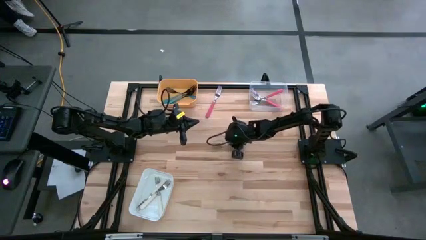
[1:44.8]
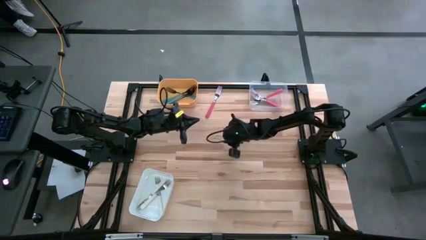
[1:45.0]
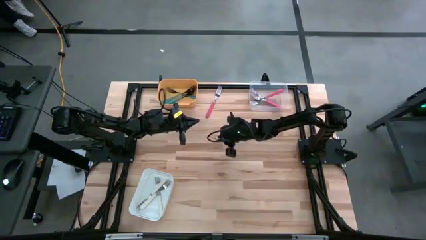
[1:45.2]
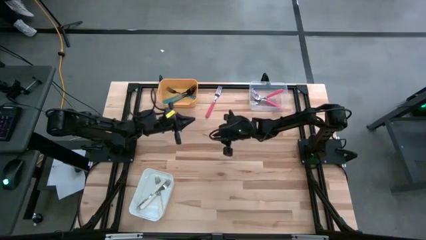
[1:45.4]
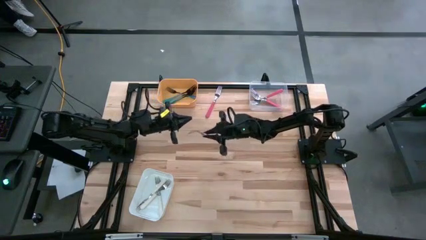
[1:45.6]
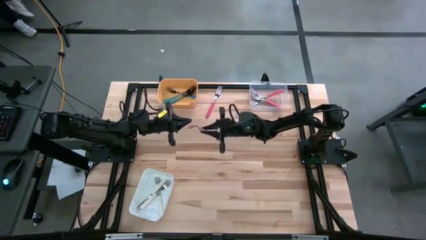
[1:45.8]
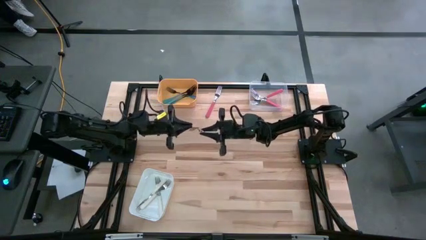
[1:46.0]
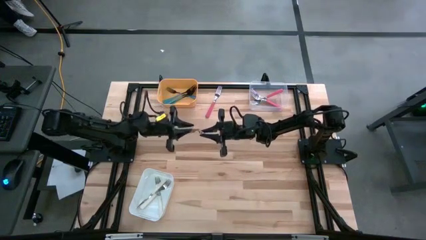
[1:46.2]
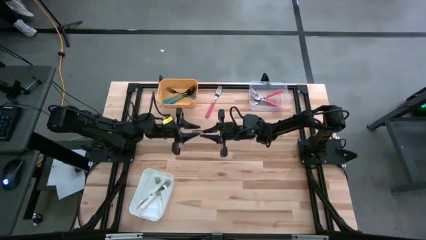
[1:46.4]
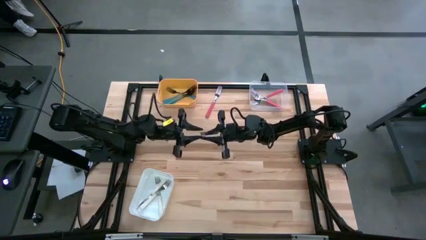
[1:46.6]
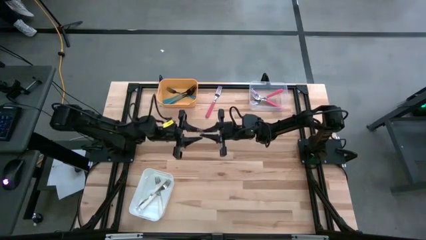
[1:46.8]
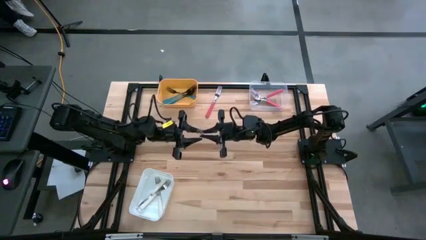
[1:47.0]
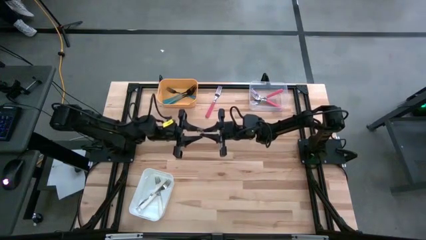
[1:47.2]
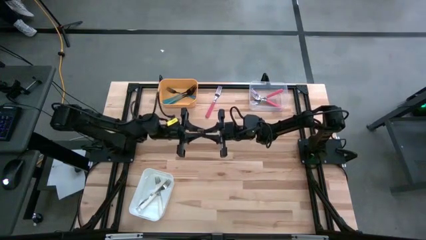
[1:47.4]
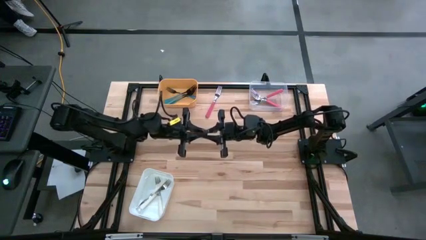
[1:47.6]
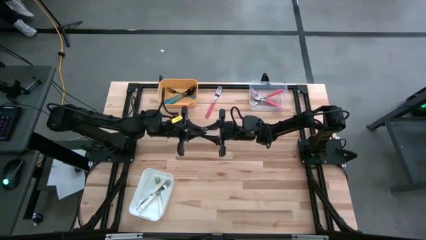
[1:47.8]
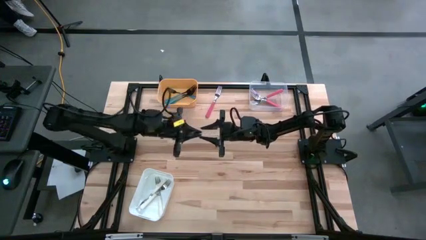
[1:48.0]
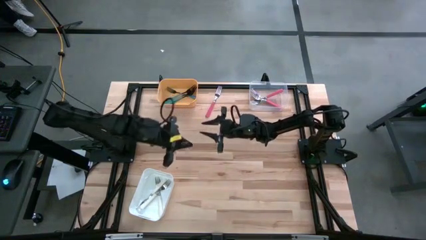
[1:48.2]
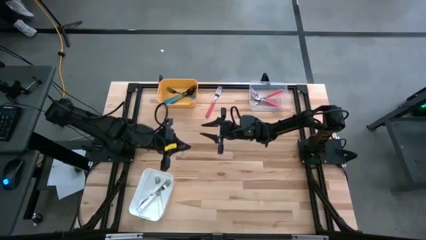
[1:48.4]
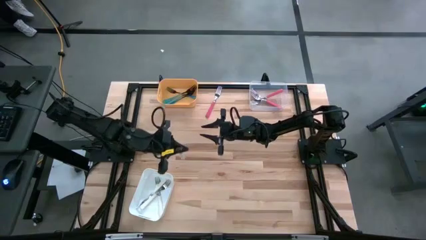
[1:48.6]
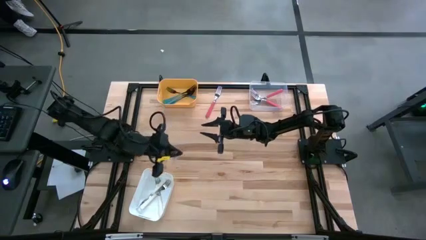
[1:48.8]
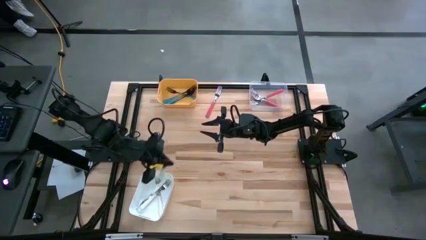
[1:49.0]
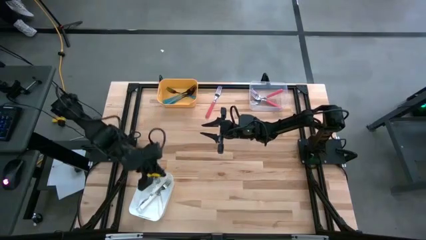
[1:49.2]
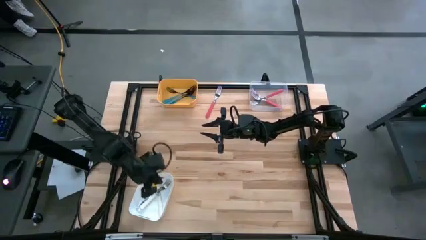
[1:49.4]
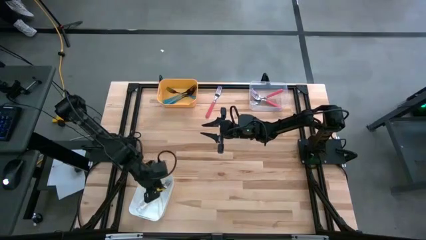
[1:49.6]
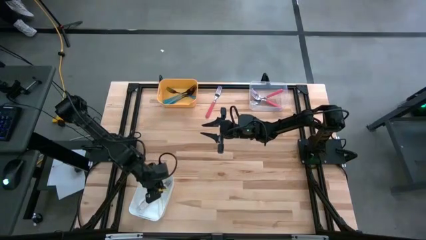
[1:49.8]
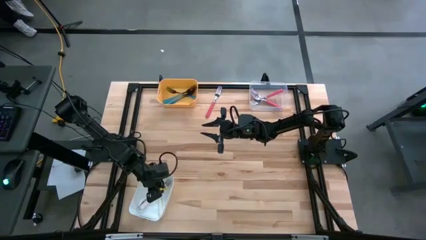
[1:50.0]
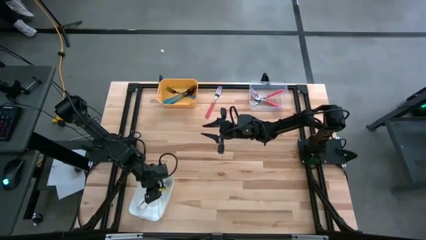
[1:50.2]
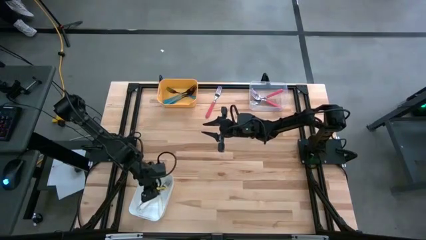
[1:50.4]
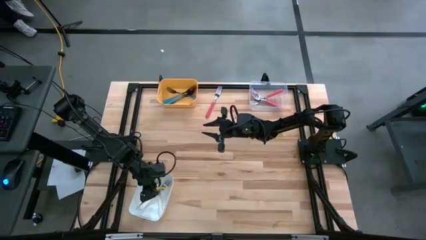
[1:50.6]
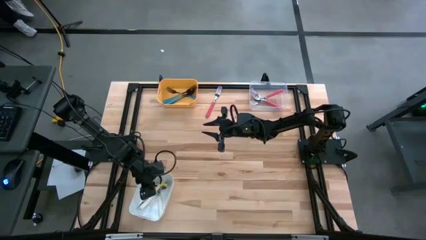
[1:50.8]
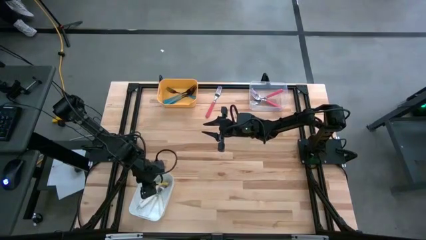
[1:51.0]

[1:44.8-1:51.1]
Task: Sort silverware by color (type)
Put the white fork into the white bin

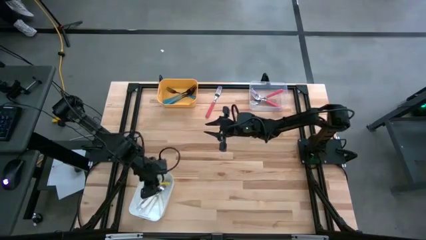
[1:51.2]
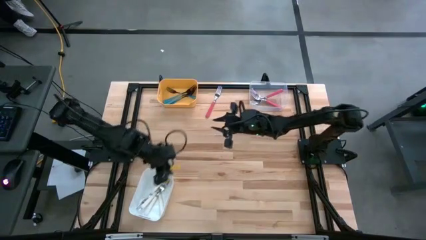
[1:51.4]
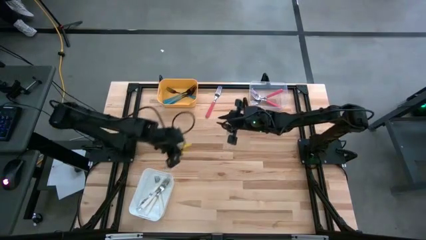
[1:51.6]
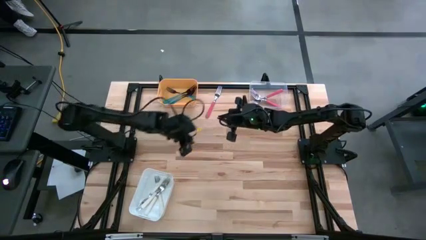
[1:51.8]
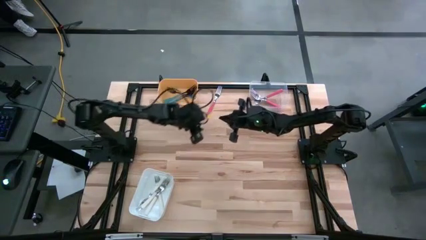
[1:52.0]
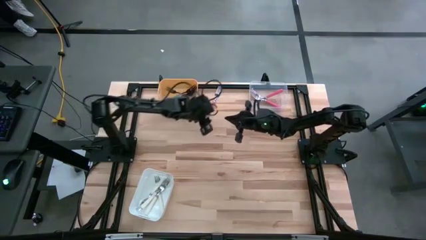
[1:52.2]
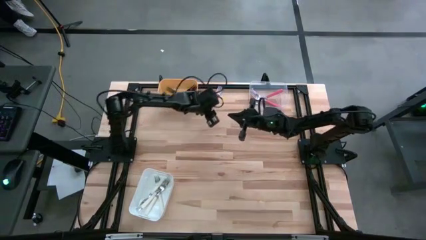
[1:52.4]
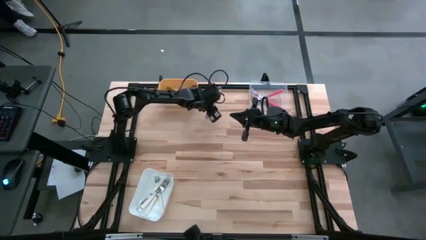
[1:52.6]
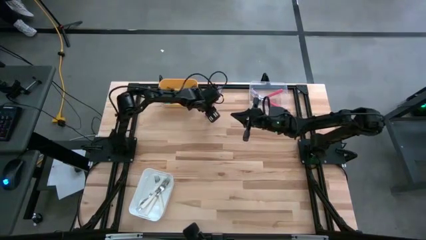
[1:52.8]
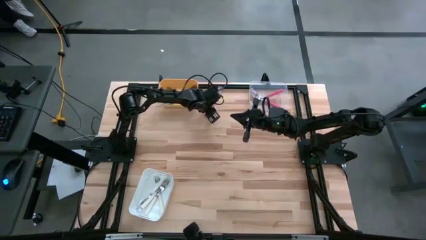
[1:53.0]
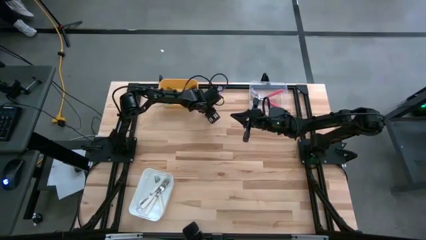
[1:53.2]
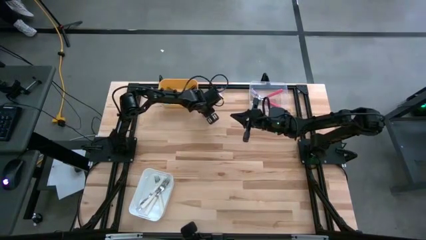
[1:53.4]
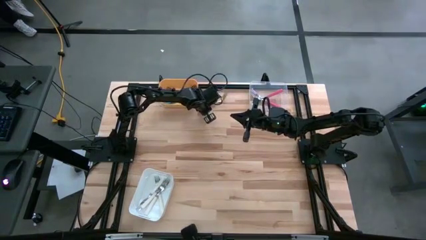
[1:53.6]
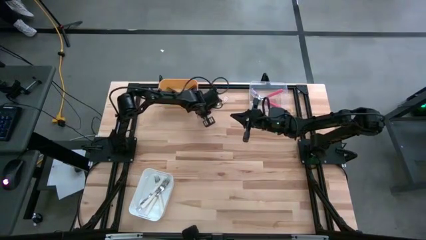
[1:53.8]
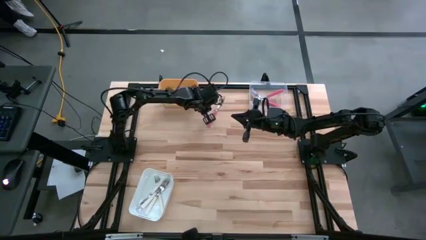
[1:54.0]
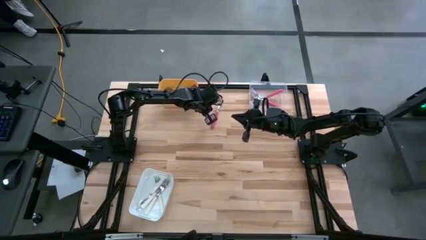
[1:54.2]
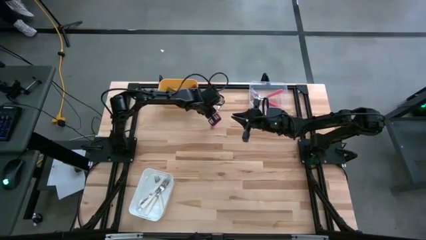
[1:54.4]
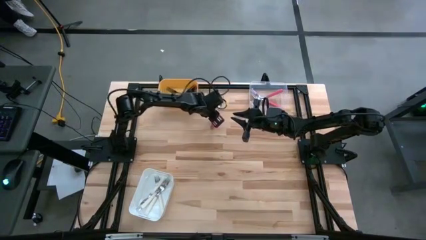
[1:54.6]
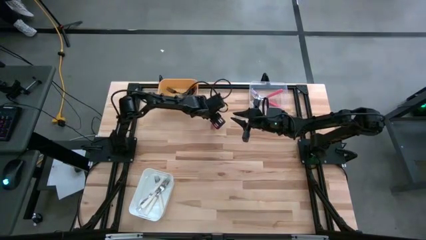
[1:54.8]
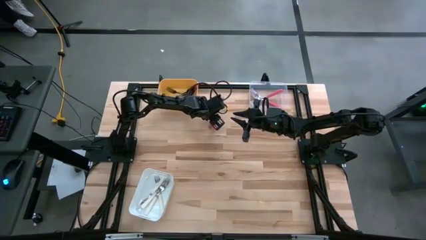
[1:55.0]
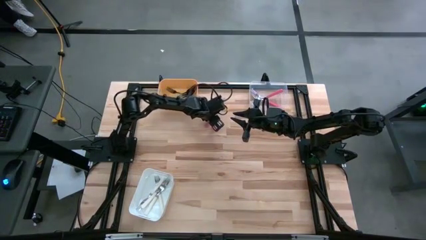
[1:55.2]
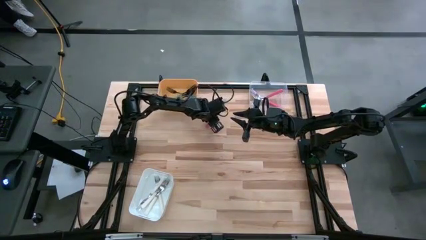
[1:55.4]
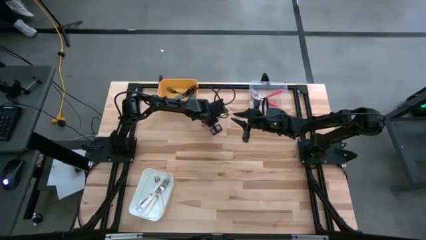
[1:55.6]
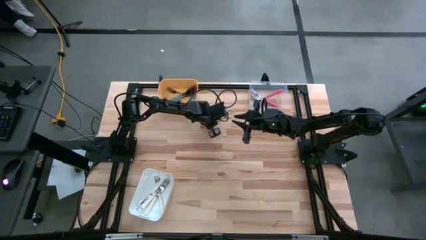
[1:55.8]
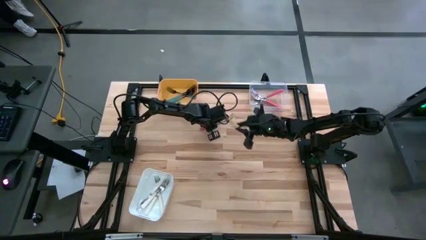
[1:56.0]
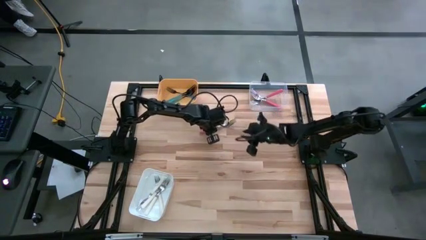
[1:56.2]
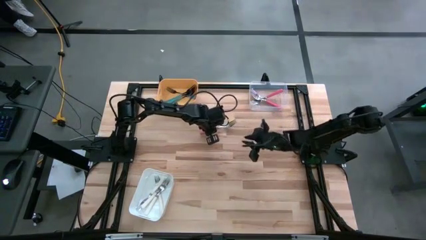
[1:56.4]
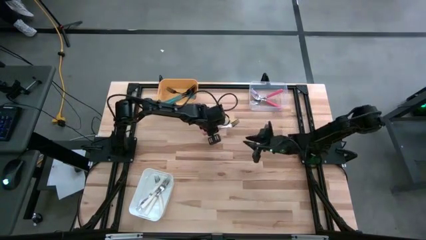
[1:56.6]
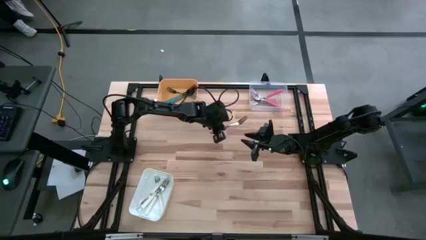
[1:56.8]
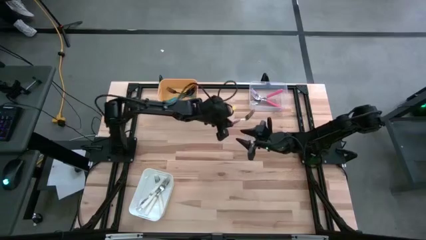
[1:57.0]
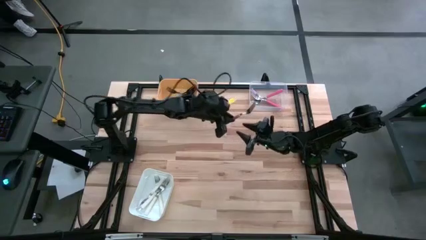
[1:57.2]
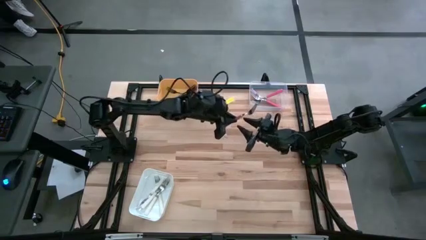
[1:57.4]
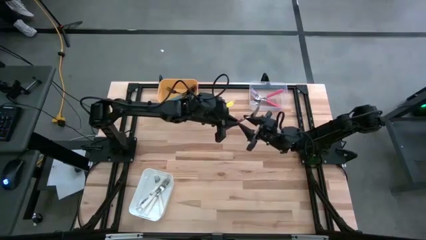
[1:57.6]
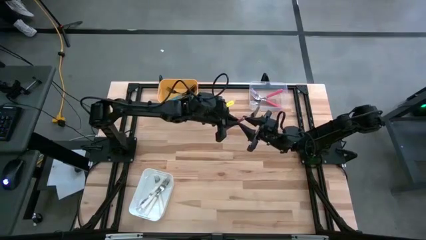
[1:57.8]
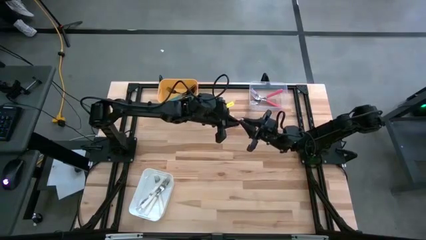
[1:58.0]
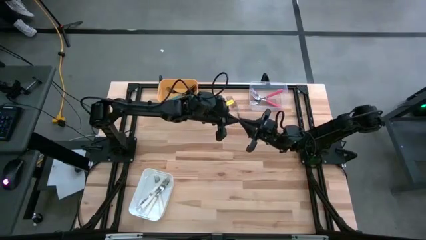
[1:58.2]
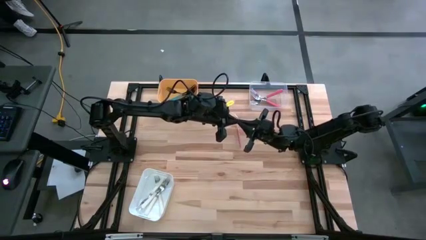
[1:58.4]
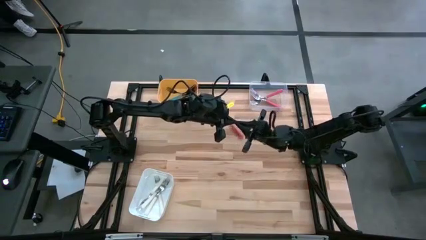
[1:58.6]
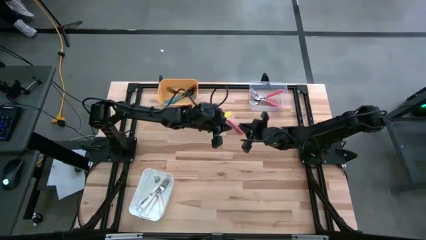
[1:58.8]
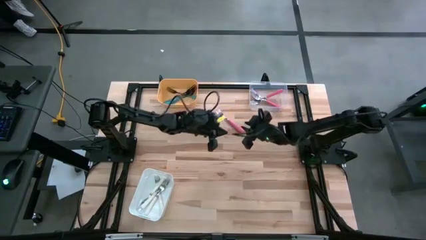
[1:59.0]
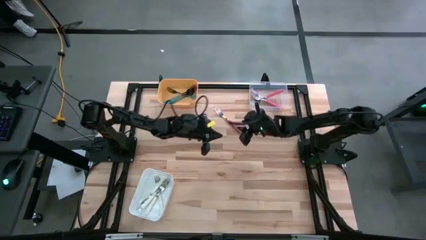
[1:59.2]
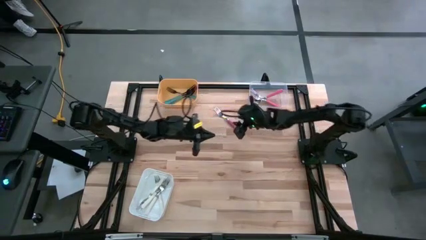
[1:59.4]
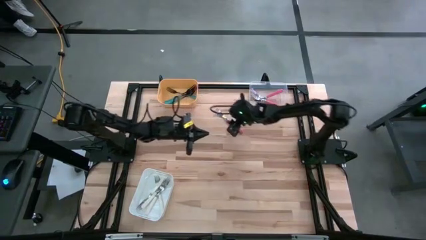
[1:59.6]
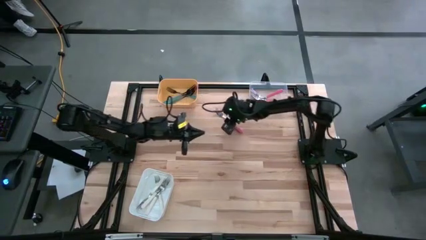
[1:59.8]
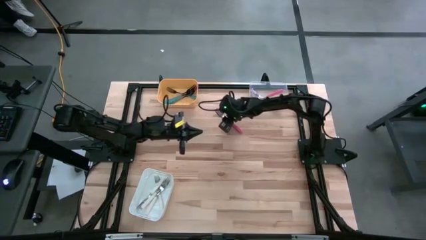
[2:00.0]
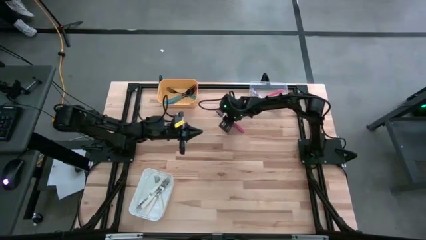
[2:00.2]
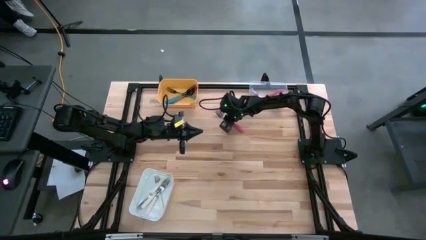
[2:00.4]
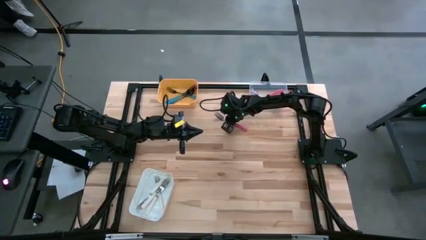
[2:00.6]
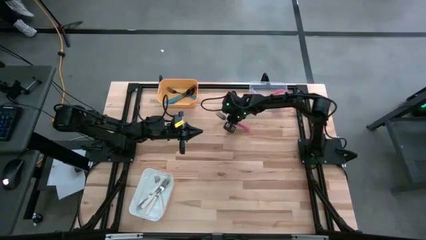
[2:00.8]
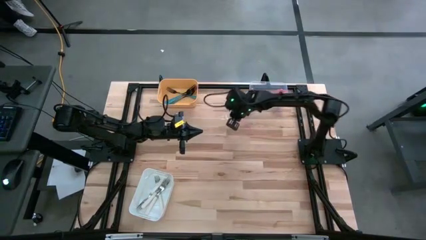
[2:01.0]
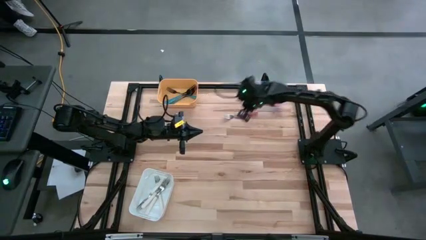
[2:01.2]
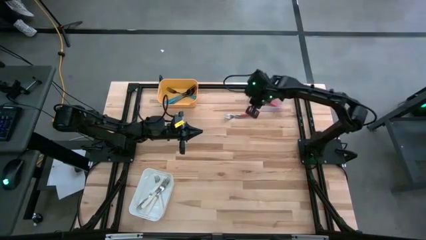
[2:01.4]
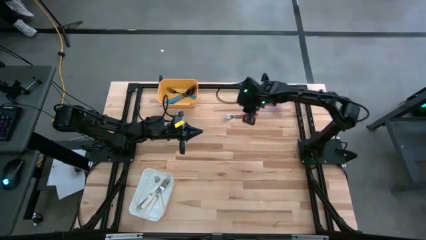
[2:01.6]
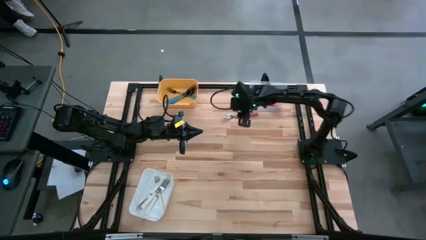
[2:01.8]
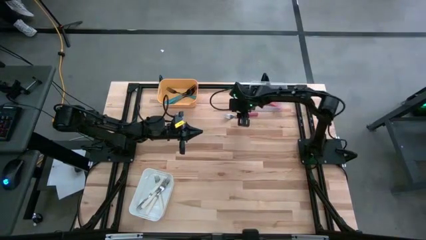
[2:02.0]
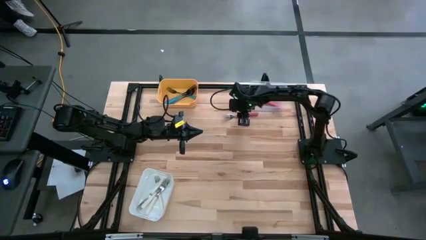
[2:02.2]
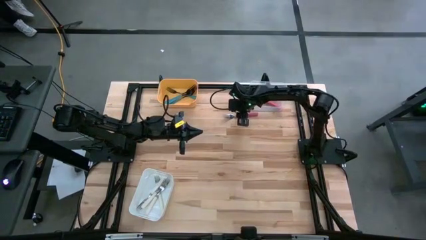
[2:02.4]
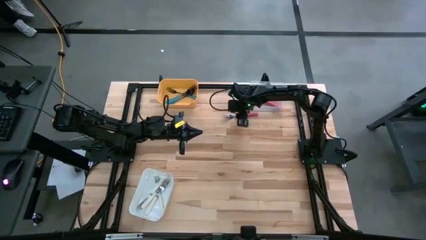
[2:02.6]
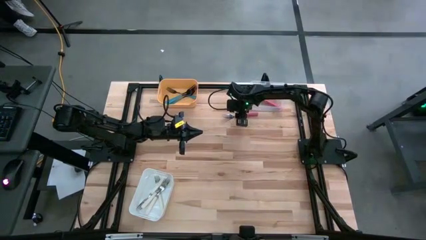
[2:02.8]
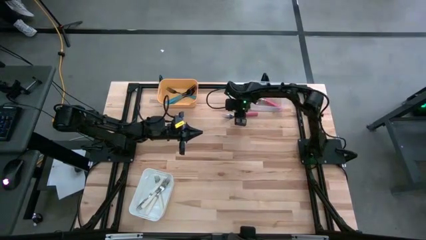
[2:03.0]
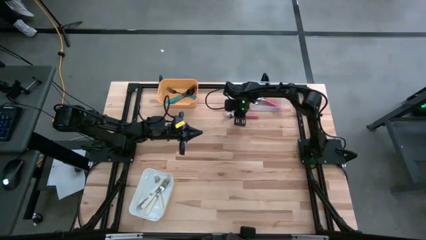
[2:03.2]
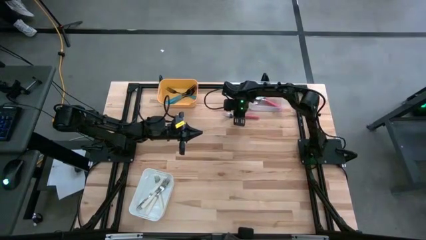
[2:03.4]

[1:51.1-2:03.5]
Put the pink fork into the transparent bin
